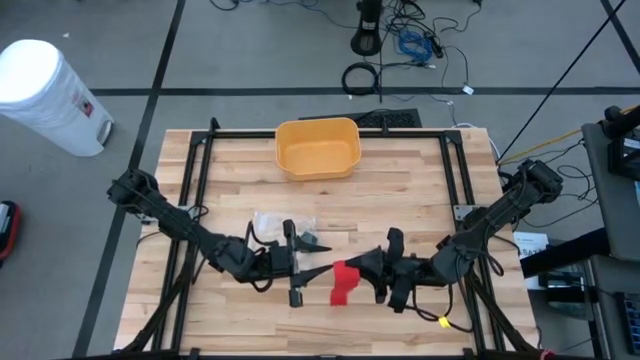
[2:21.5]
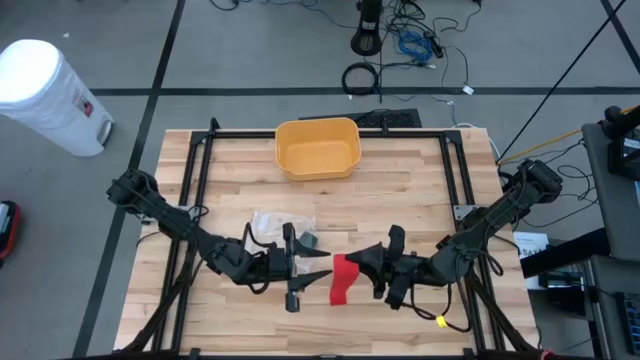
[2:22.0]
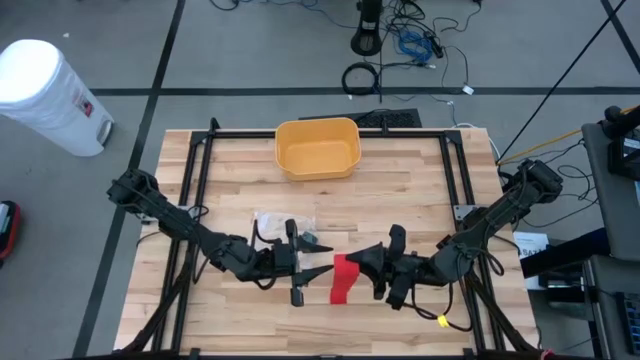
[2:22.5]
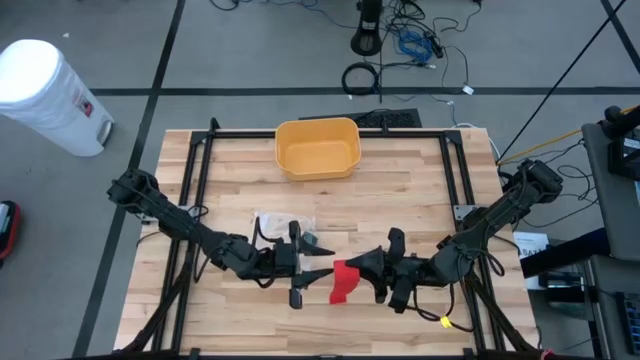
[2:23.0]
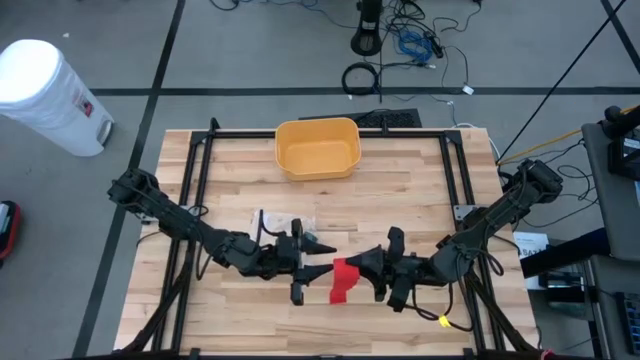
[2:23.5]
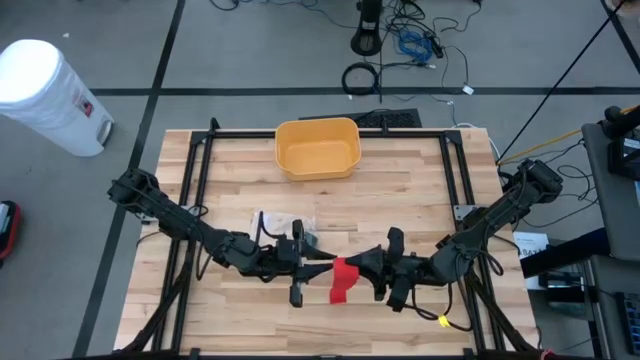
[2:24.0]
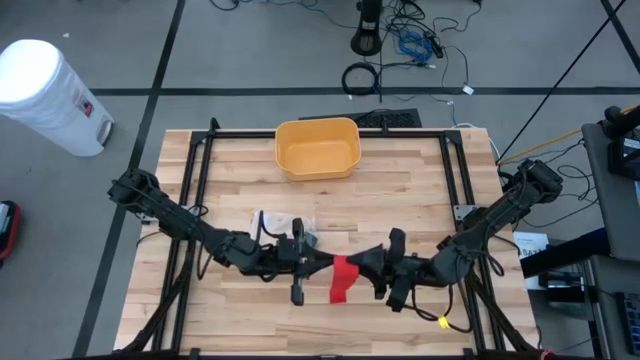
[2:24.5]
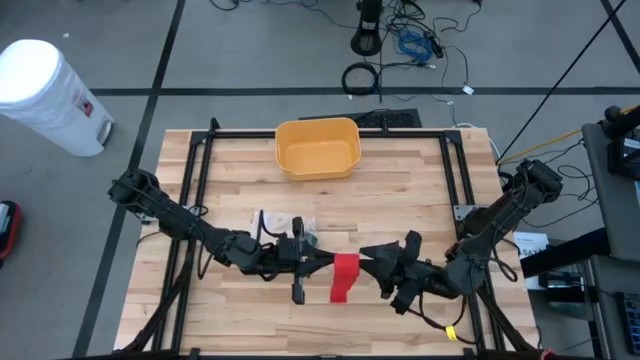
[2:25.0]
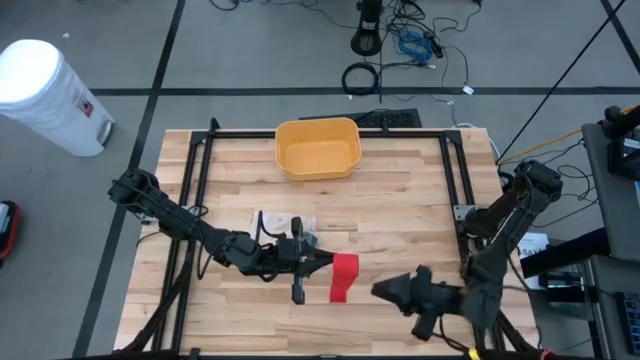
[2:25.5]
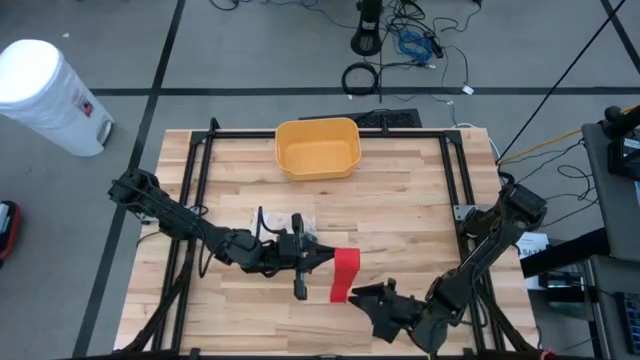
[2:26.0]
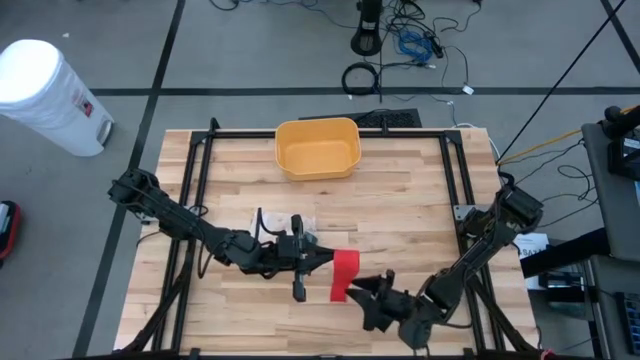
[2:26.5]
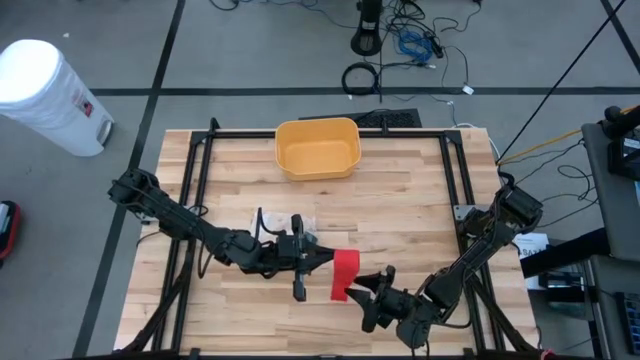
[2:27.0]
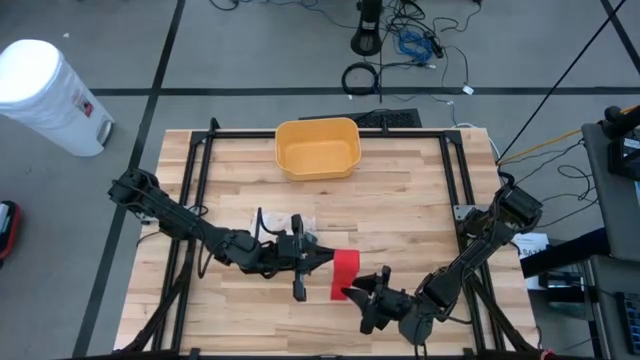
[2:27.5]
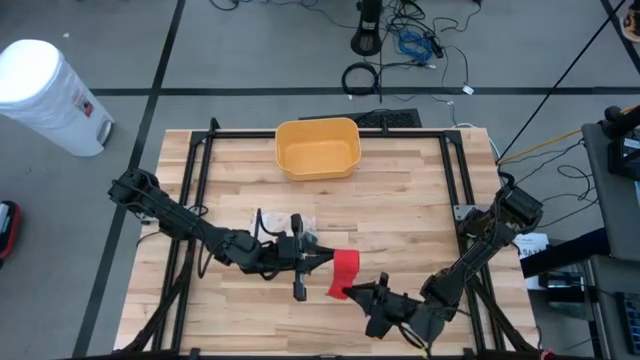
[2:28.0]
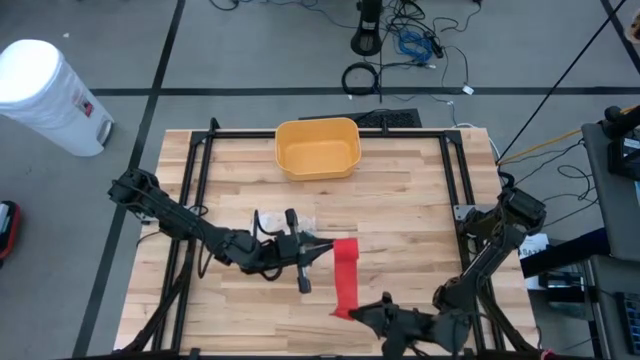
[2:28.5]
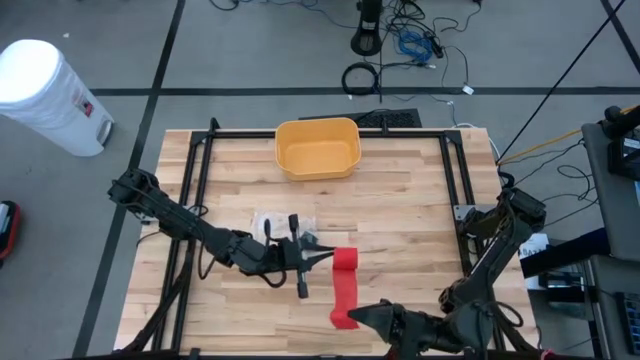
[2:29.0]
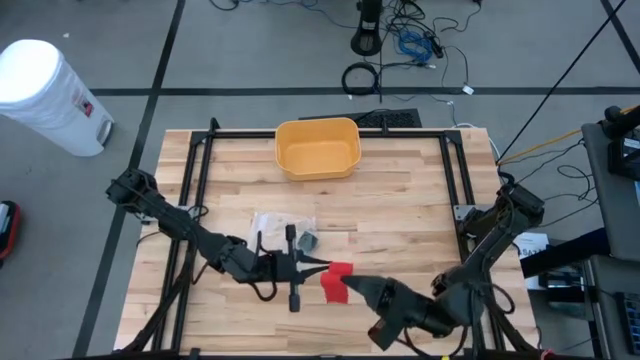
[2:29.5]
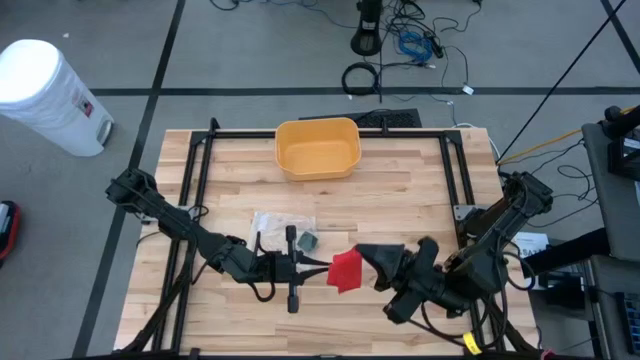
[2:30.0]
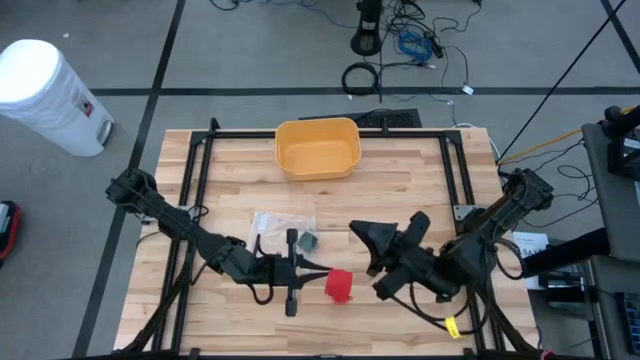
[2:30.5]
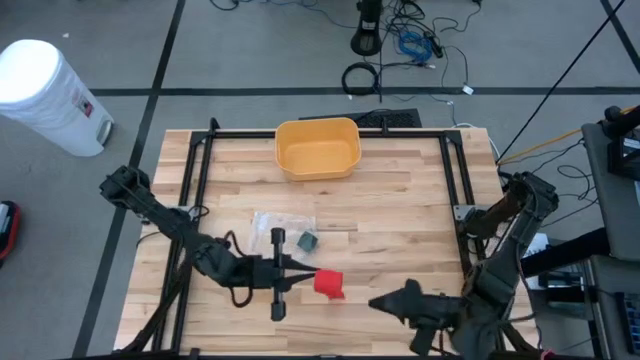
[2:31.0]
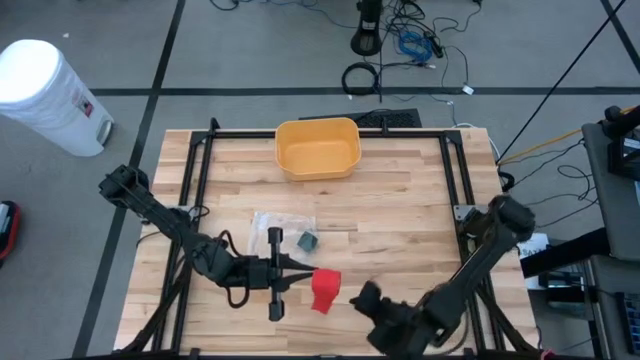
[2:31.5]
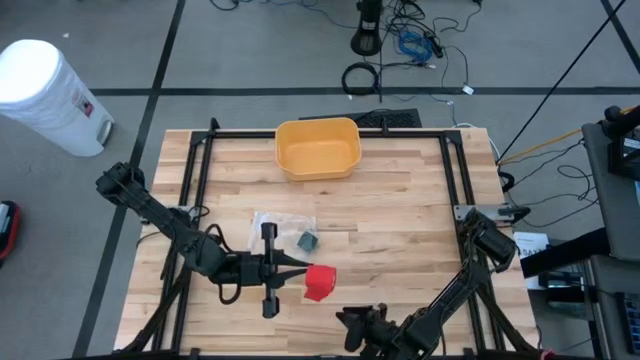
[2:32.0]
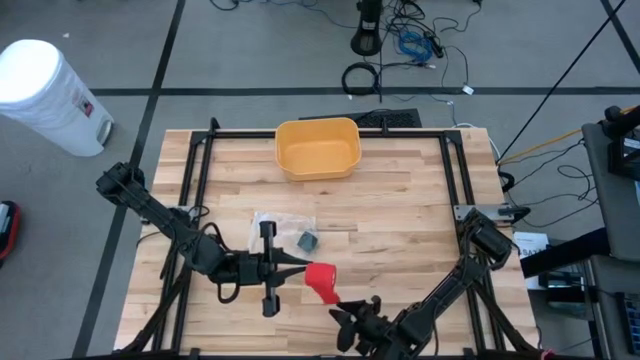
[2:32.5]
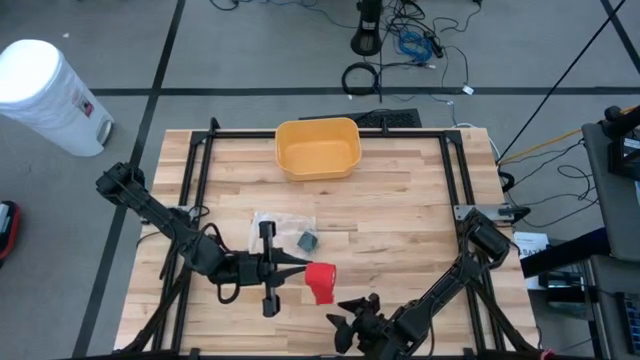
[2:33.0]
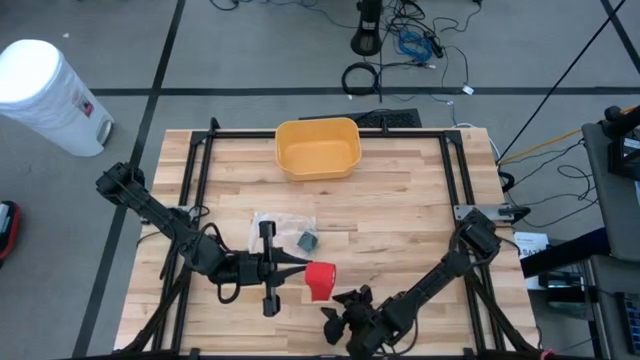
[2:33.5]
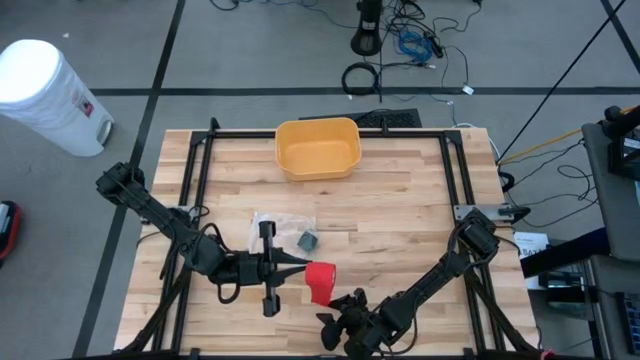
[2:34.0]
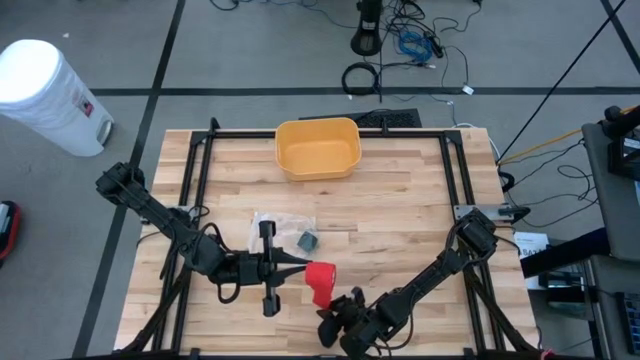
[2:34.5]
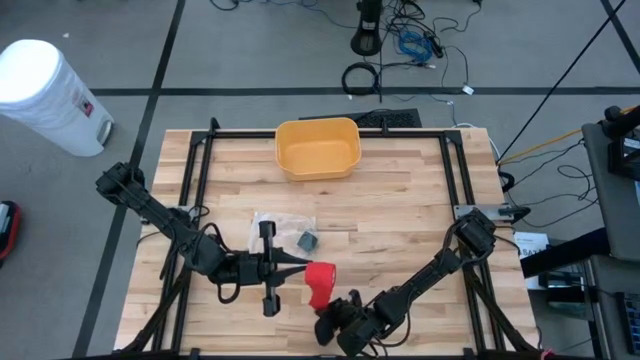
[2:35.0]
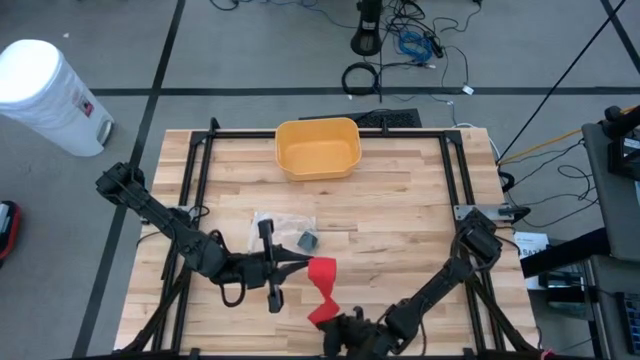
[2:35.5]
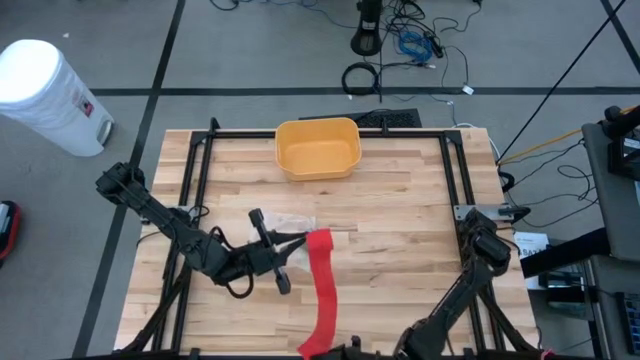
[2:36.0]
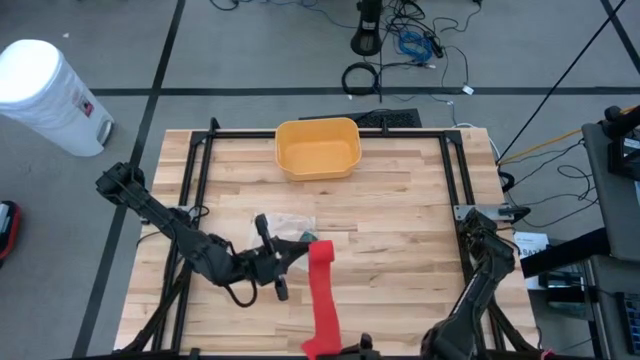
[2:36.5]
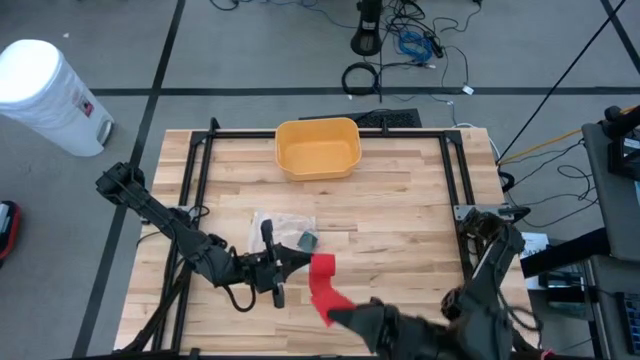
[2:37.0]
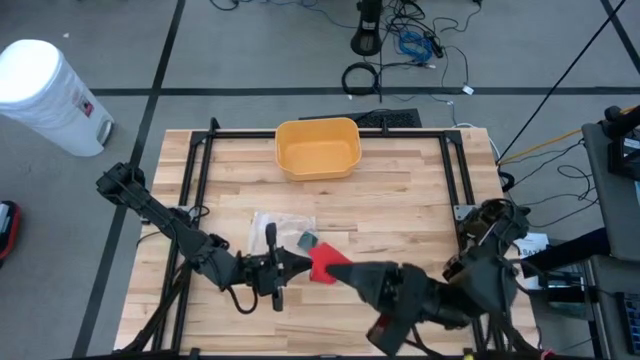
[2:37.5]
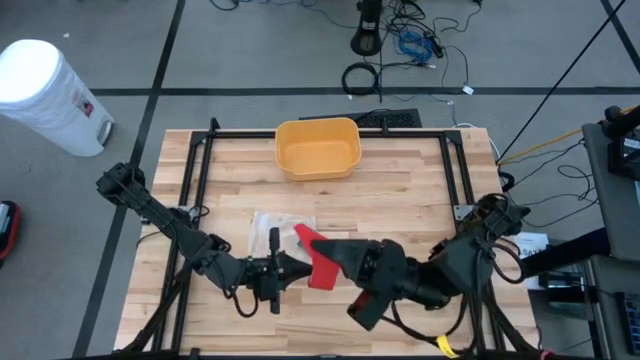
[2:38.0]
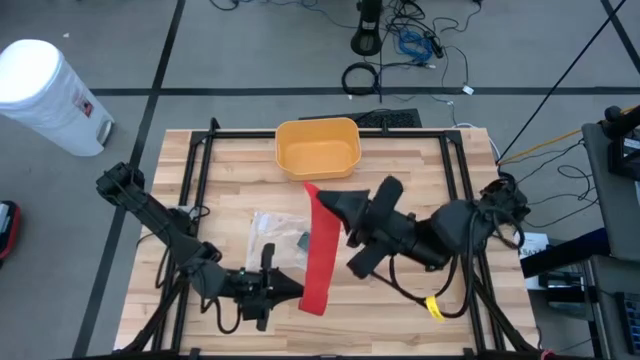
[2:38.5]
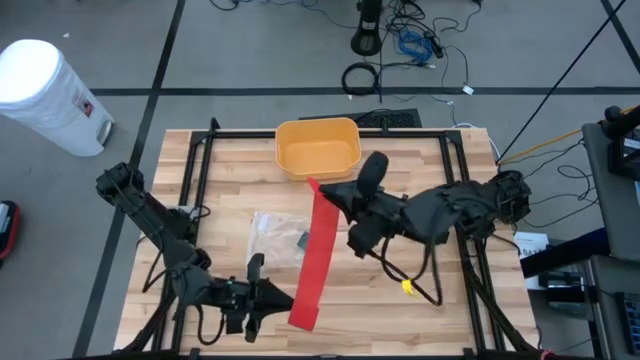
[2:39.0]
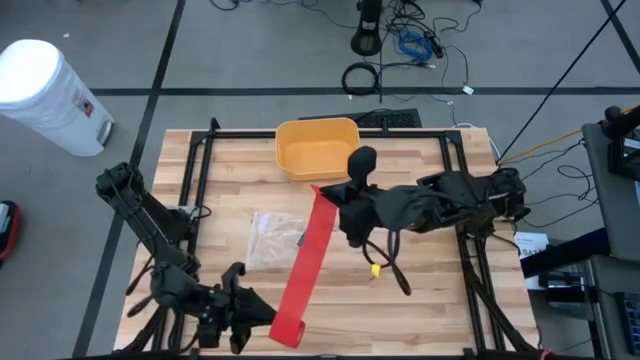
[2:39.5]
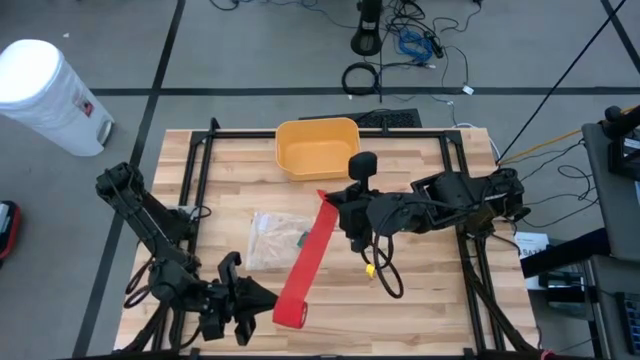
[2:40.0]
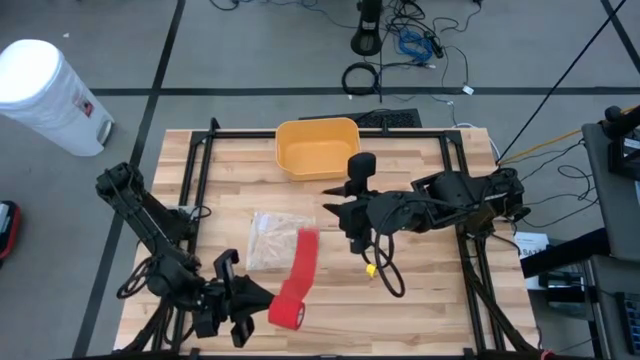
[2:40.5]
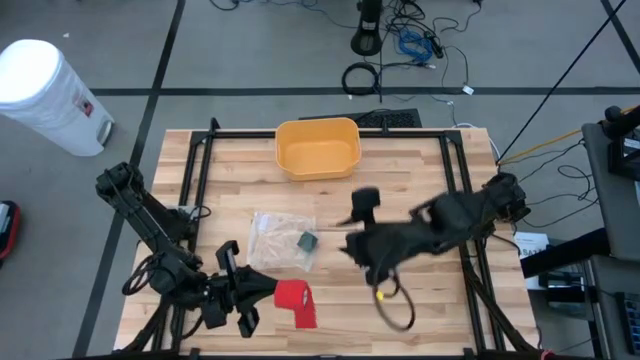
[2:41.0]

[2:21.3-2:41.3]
Task: Roll bandage
Roll the red bandage
